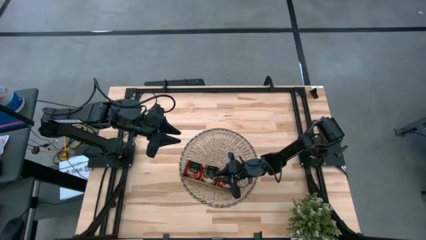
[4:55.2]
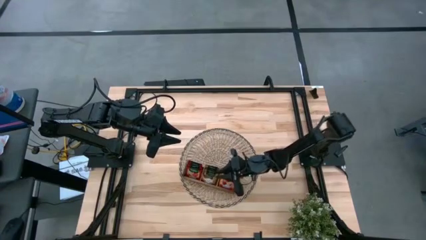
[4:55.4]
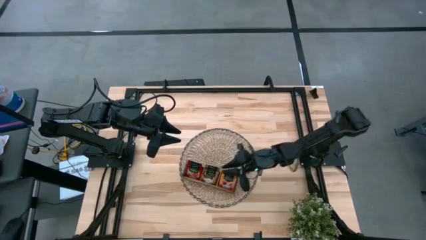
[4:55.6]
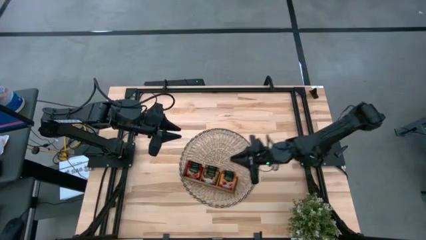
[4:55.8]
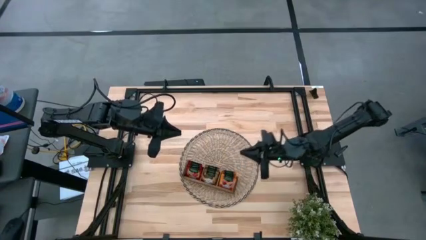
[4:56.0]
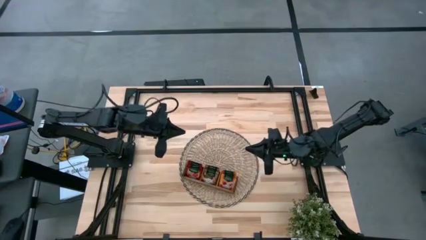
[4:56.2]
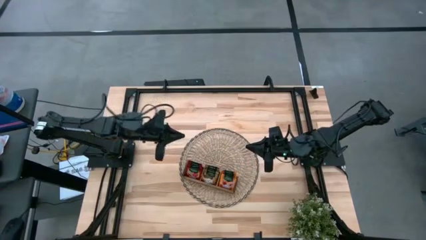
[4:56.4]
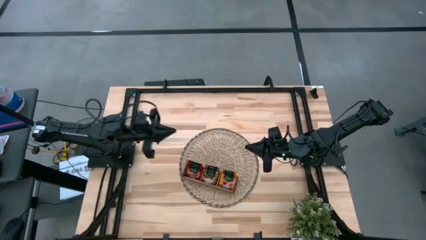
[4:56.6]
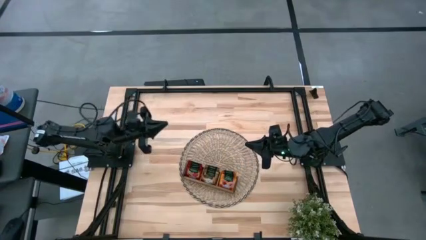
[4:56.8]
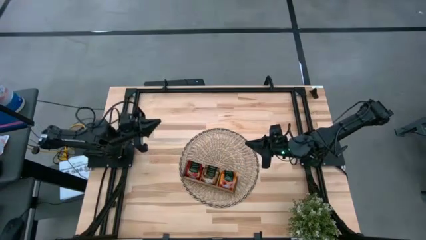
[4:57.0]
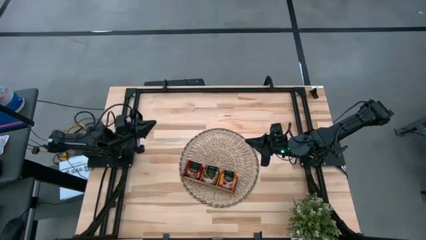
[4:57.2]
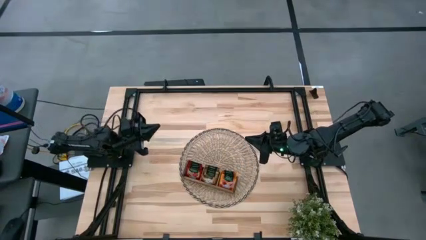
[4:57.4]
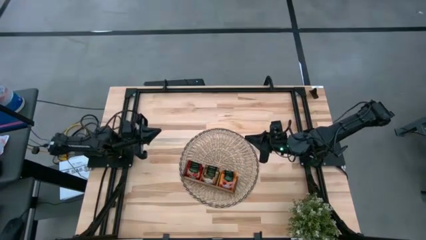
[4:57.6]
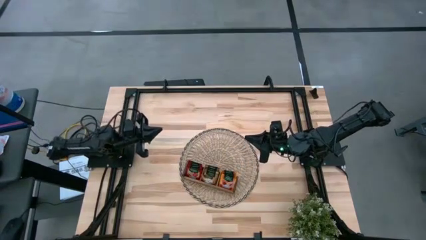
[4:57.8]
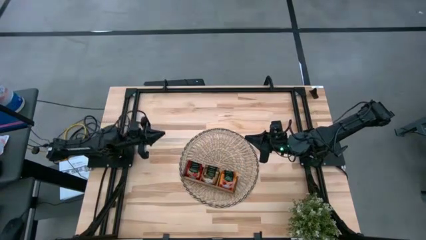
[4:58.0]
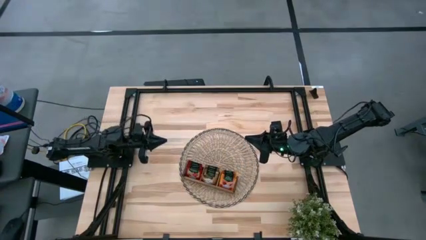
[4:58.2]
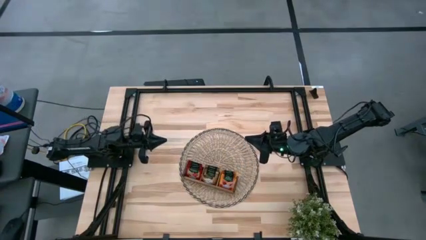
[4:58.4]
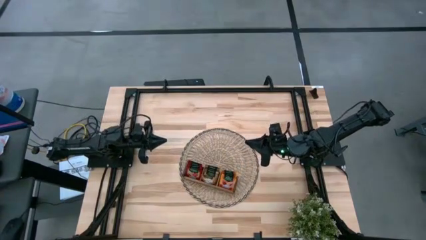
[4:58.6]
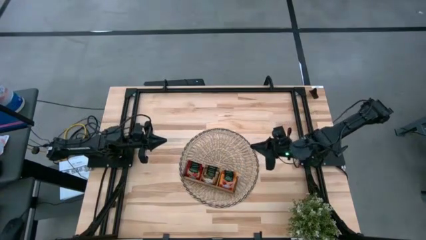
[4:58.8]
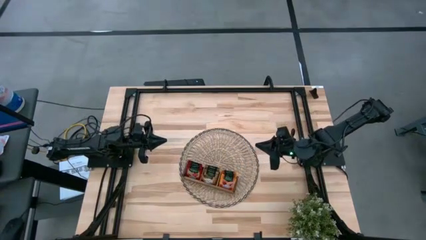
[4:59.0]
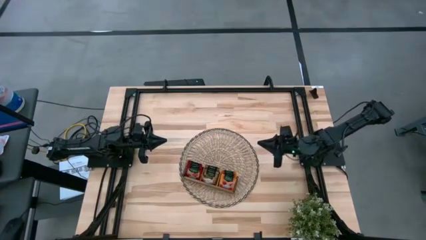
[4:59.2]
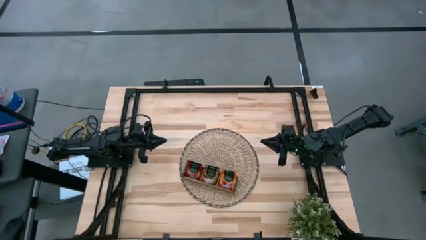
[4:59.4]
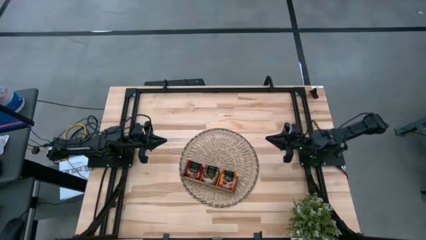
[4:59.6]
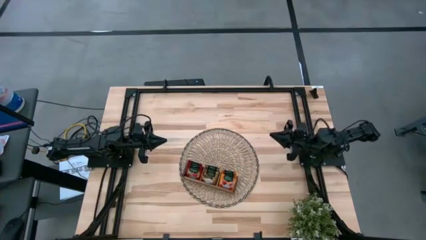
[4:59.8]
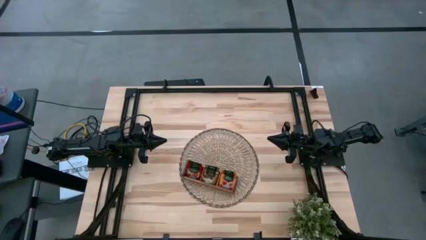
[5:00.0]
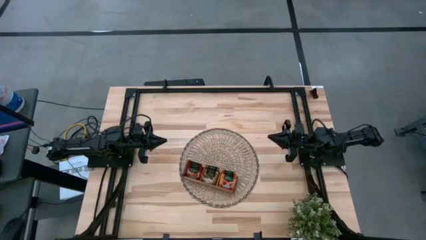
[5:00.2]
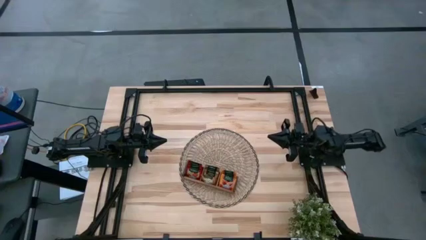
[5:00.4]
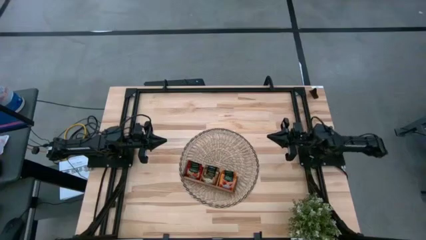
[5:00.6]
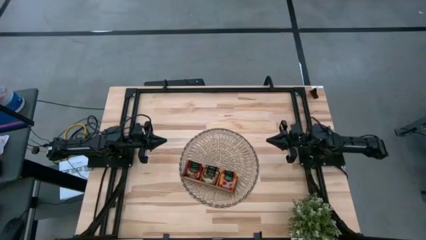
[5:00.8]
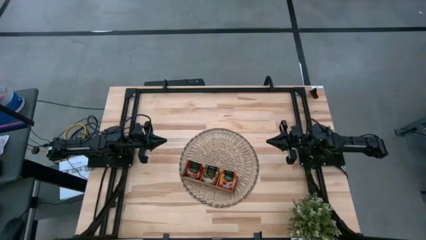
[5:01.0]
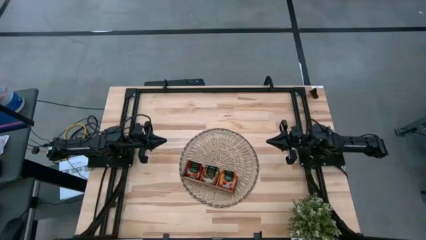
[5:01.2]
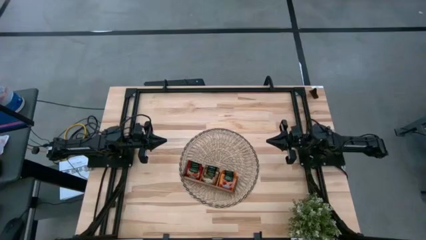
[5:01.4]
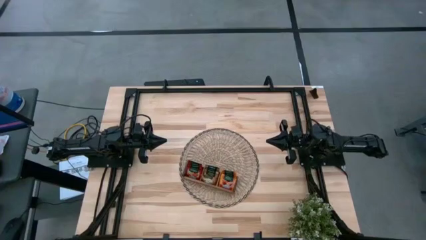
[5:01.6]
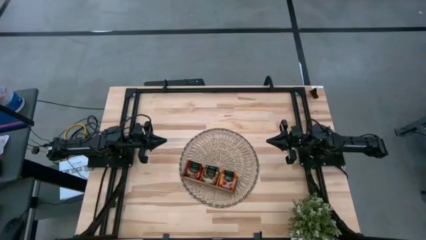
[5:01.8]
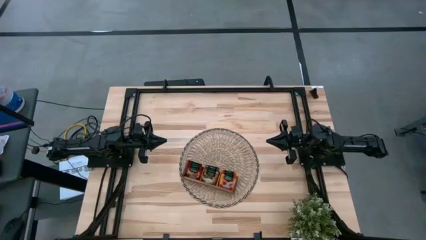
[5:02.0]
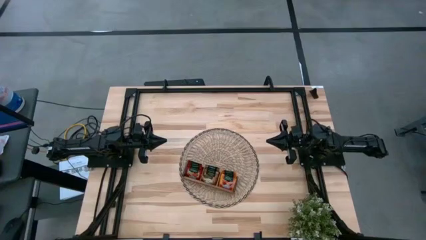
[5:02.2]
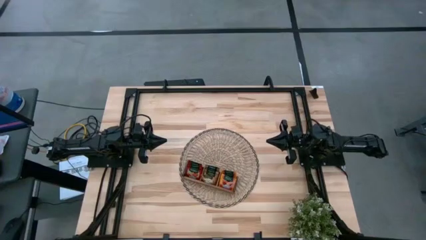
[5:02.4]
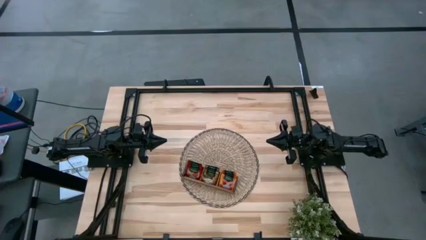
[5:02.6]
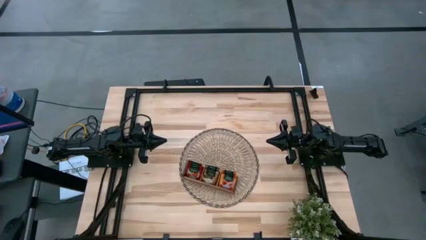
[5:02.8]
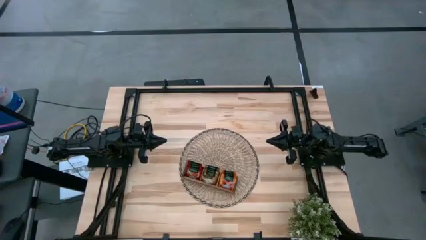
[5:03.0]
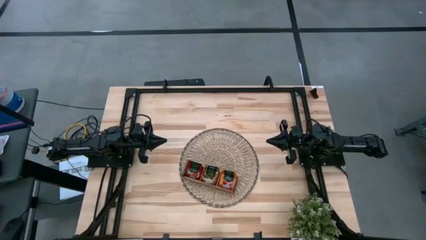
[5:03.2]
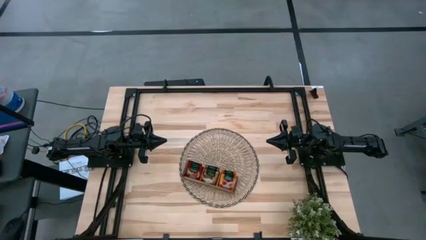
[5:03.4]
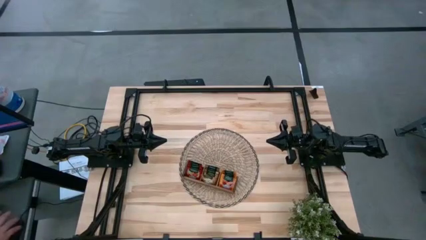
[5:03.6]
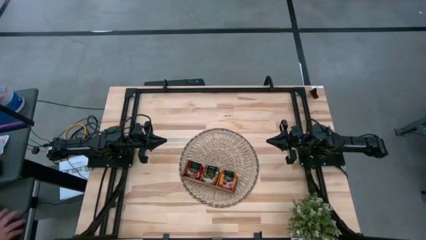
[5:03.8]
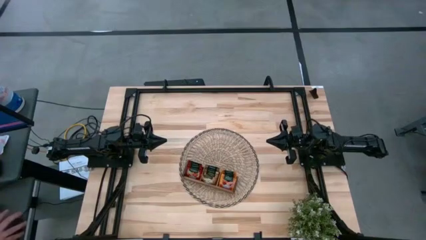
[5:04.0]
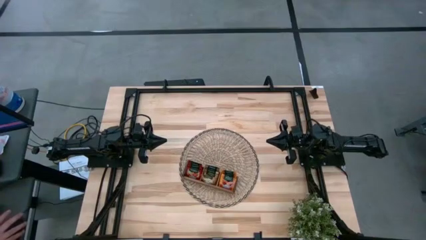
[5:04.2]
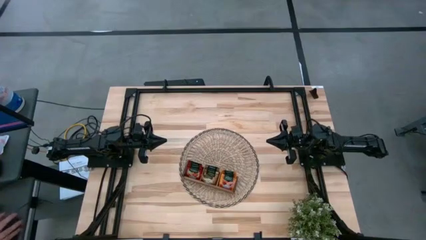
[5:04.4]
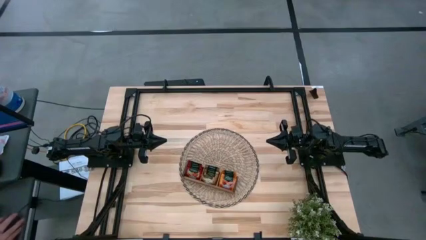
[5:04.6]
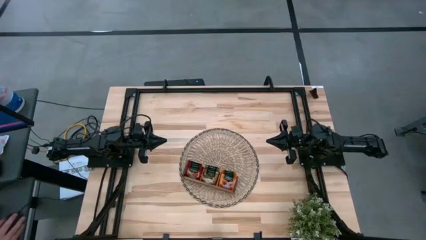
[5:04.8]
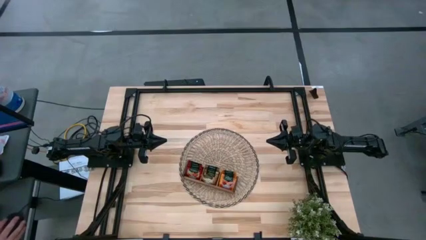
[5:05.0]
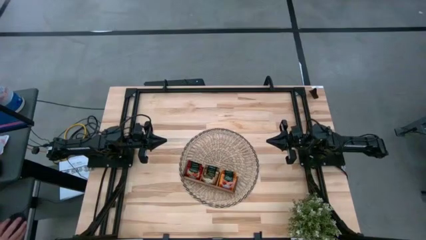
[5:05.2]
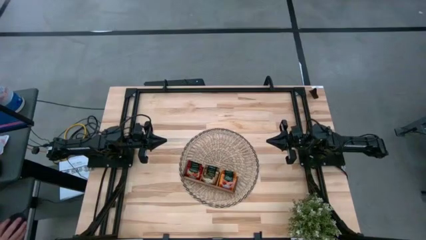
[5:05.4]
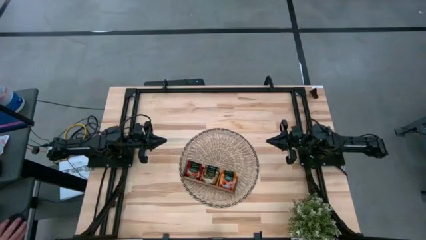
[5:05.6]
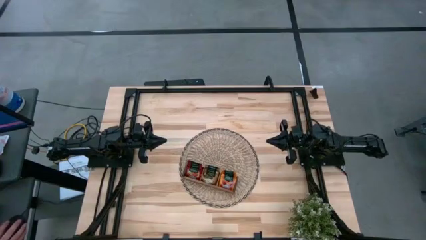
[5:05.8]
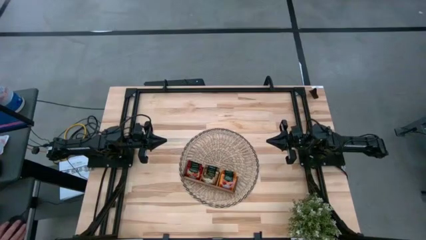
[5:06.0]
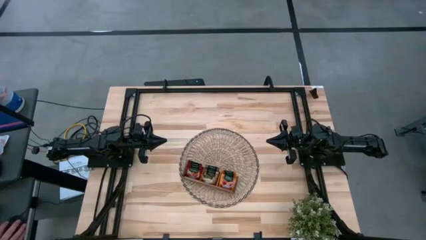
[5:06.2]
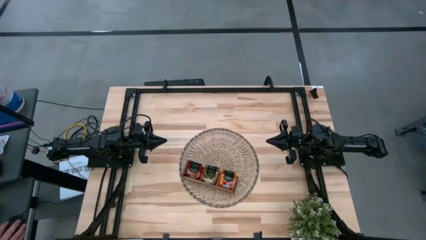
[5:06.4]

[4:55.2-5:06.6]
Task: Pick & Place Tea
Return to Home Position

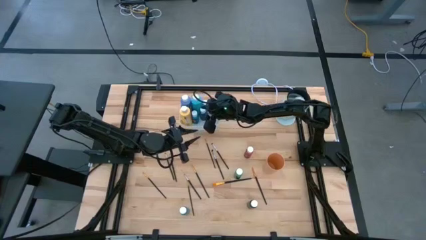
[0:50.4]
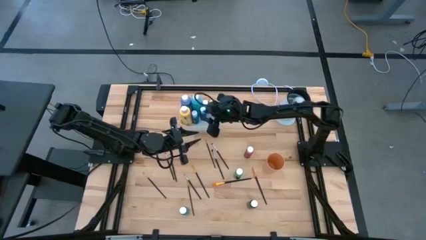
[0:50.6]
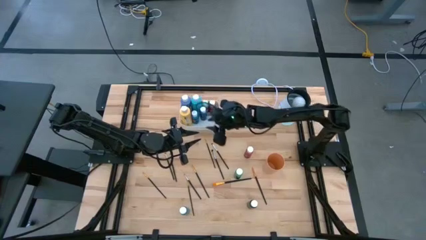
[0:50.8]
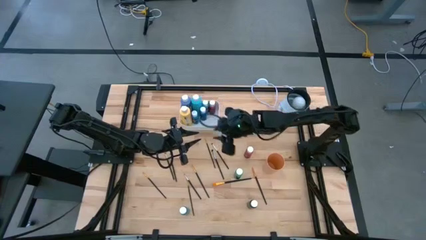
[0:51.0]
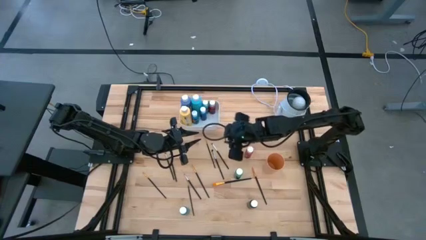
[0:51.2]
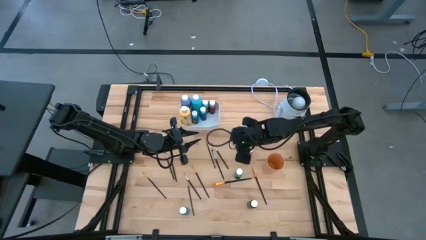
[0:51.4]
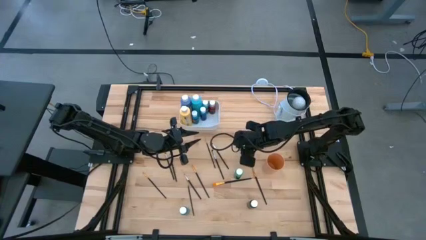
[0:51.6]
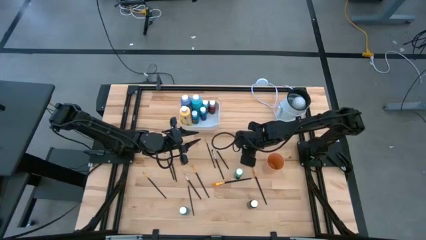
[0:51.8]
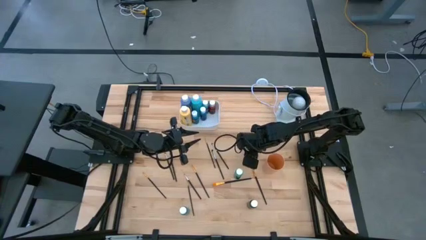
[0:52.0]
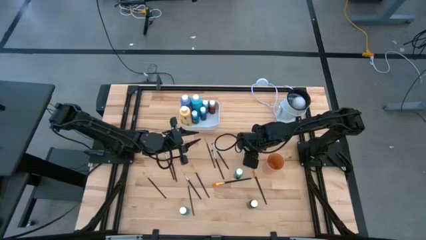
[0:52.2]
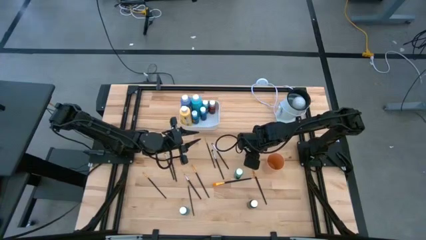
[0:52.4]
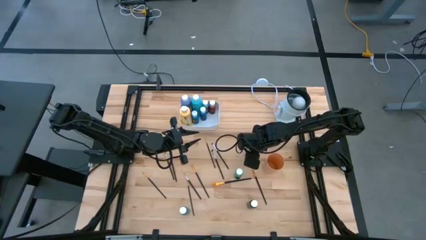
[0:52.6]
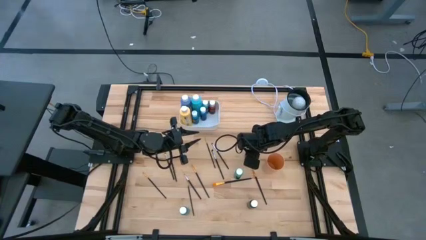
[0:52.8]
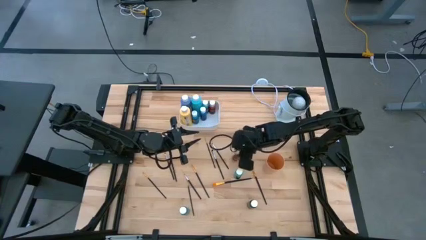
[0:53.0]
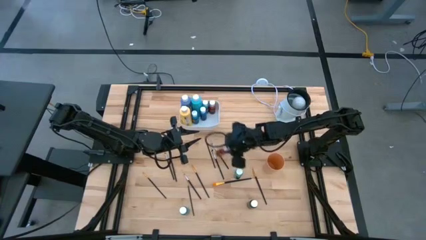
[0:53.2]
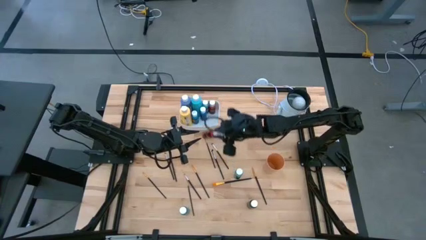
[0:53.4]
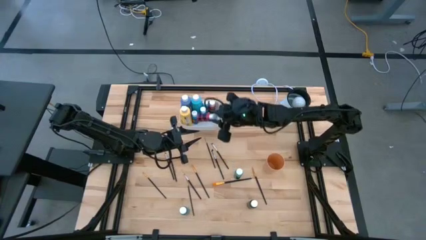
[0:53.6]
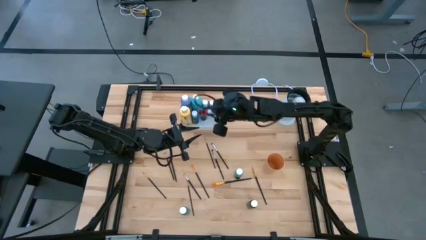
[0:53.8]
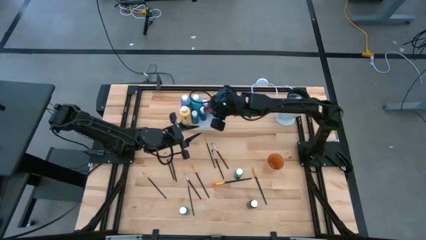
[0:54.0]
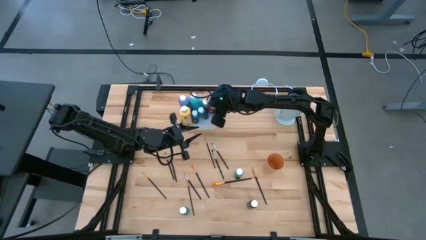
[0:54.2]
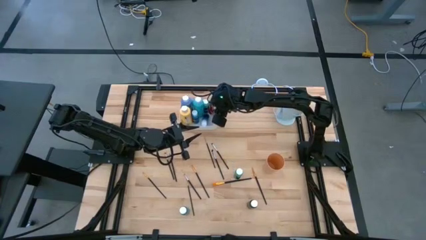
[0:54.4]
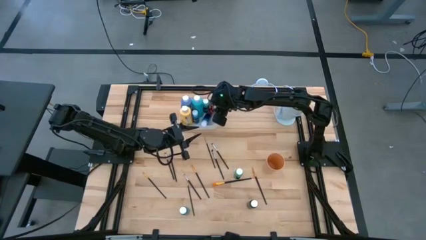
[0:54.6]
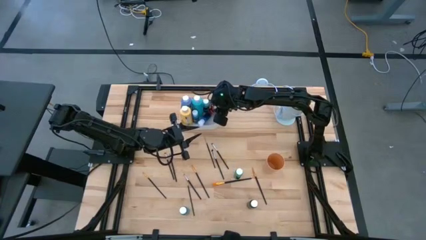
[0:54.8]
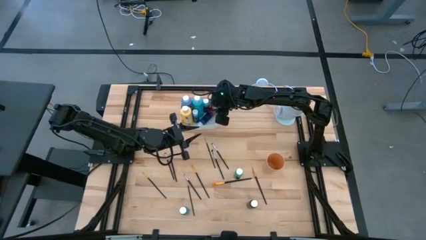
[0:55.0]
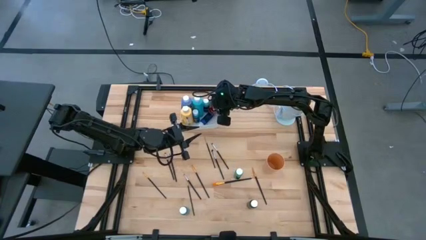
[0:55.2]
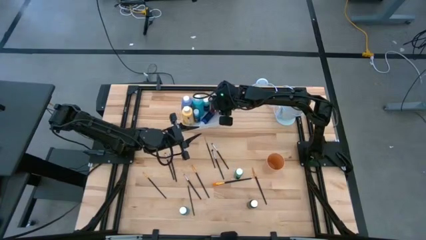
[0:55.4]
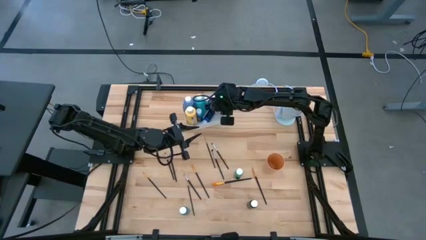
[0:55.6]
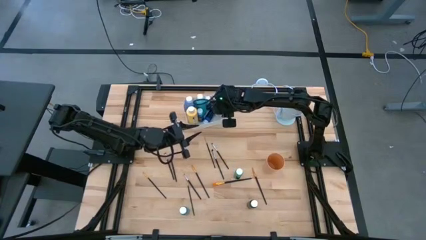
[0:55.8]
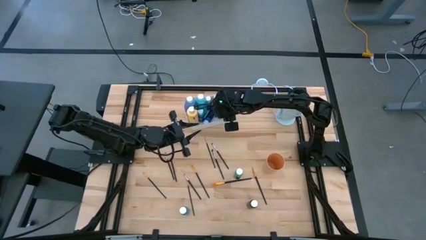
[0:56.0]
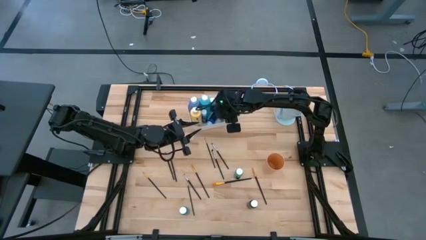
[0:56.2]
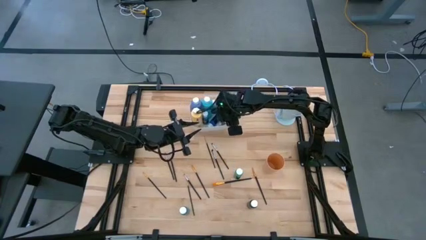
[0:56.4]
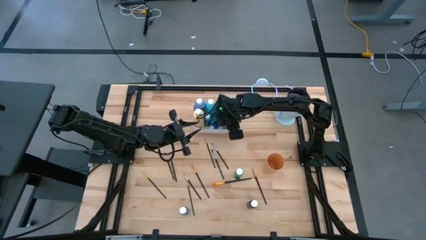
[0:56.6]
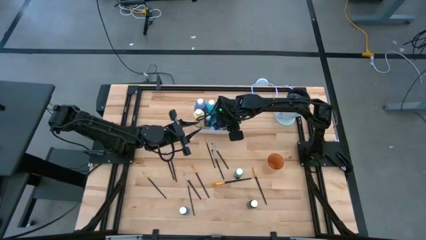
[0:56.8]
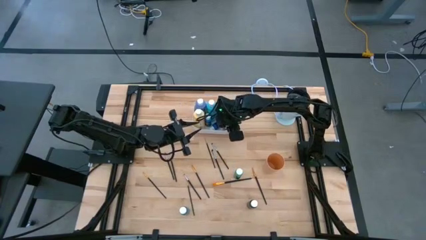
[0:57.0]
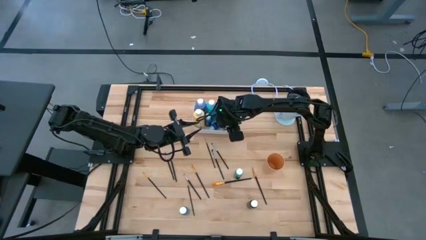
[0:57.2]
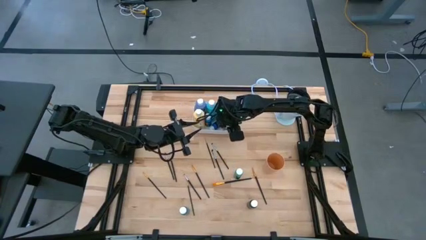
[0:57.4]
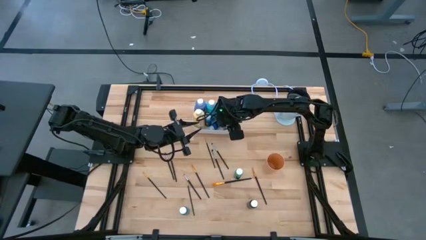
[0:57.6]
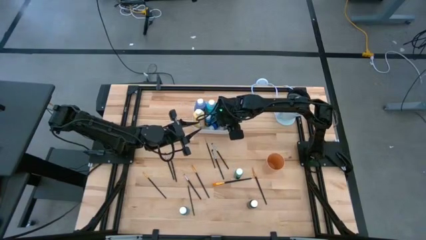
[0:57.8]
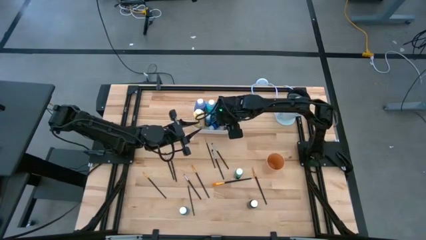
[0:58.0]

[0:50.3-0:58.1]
Task: Pick & Place Paint Supplies
Put the red paint bottle into the white bin
